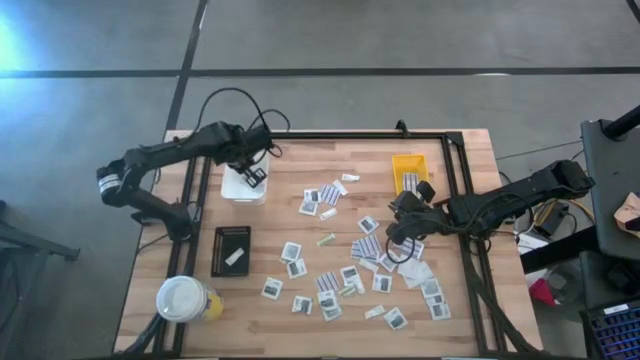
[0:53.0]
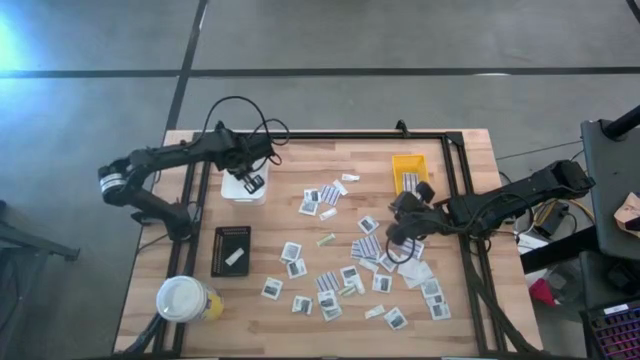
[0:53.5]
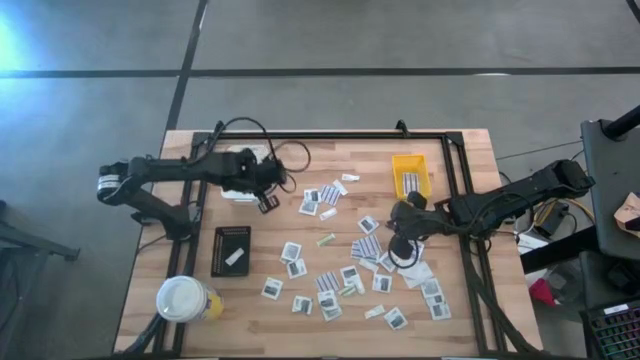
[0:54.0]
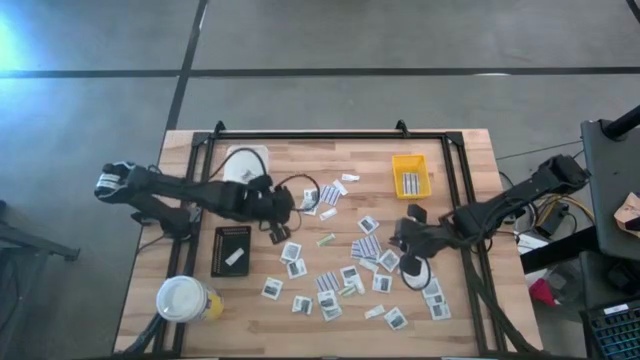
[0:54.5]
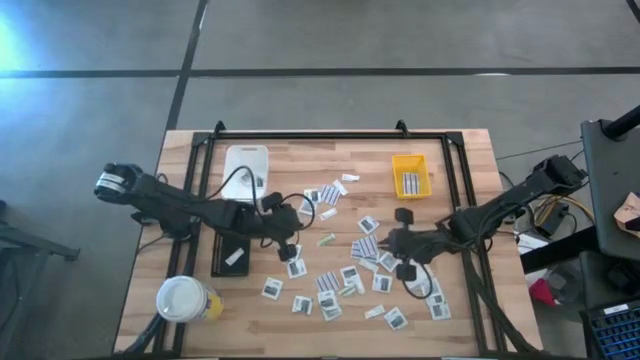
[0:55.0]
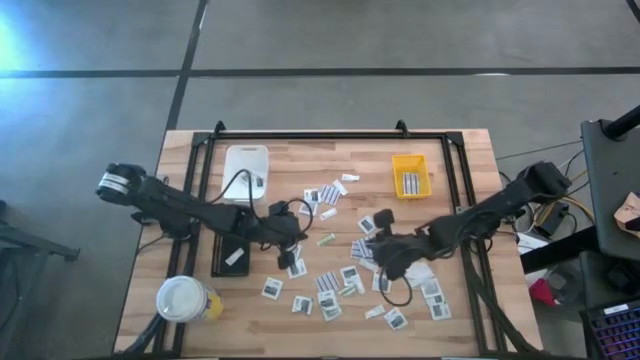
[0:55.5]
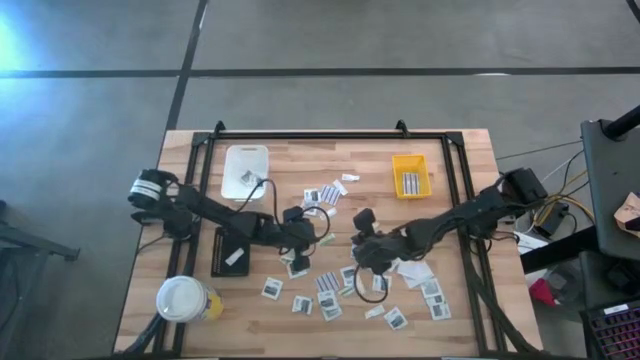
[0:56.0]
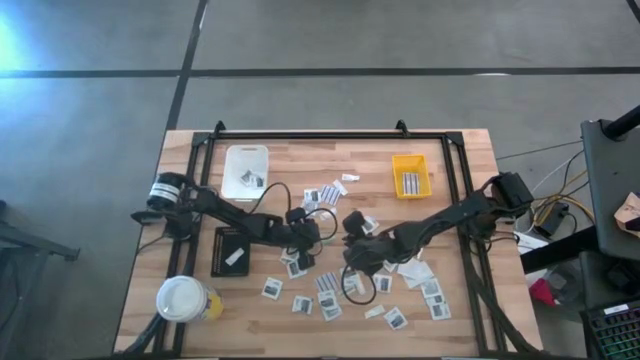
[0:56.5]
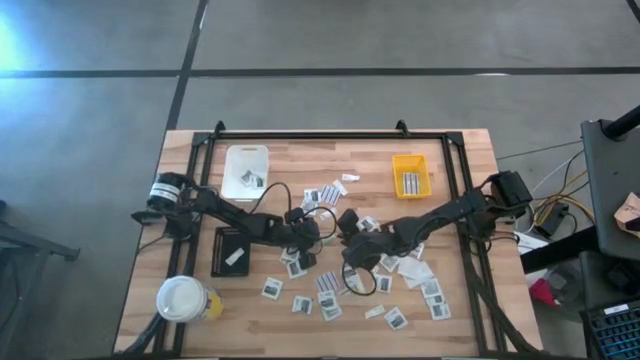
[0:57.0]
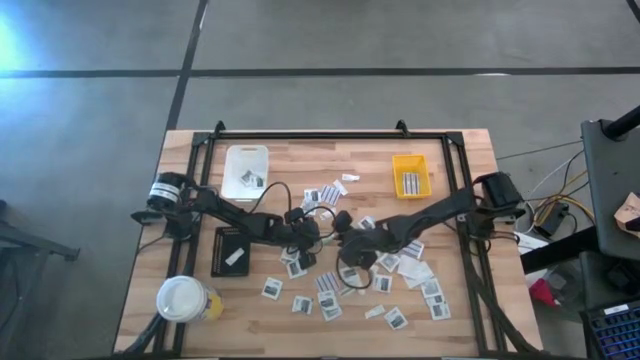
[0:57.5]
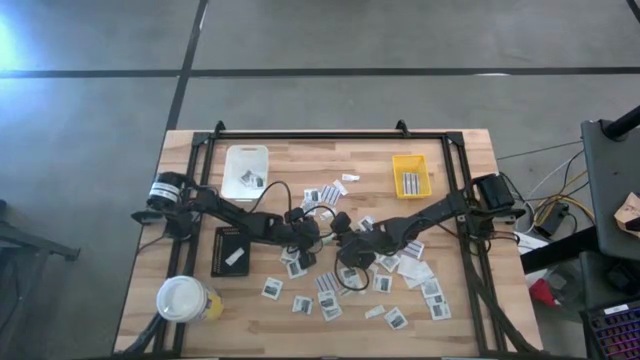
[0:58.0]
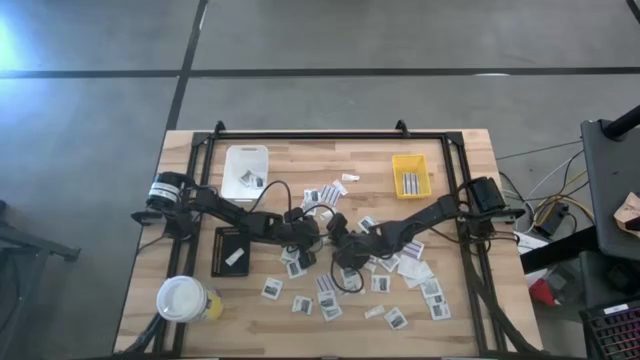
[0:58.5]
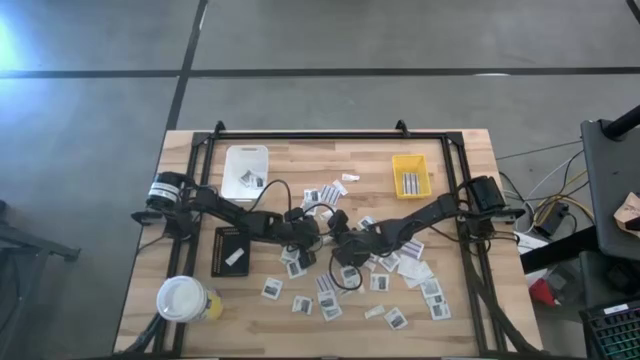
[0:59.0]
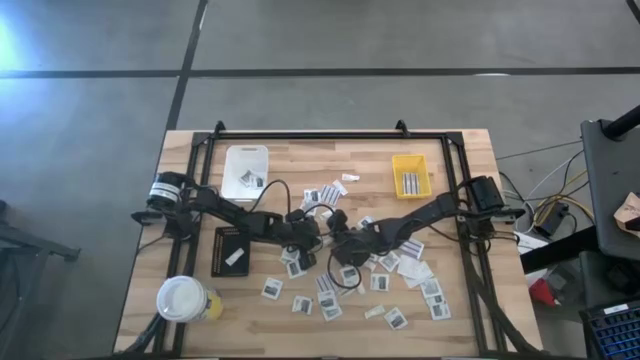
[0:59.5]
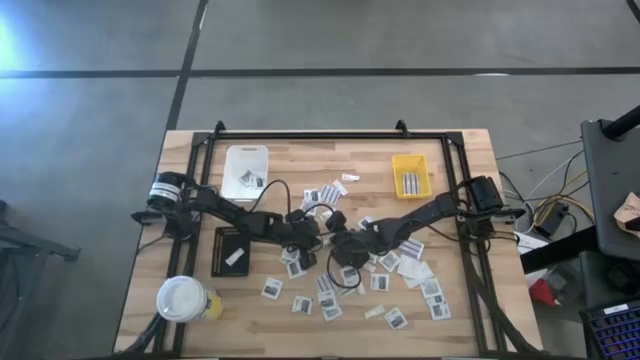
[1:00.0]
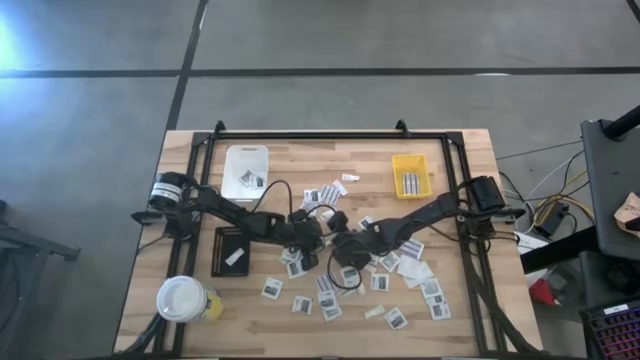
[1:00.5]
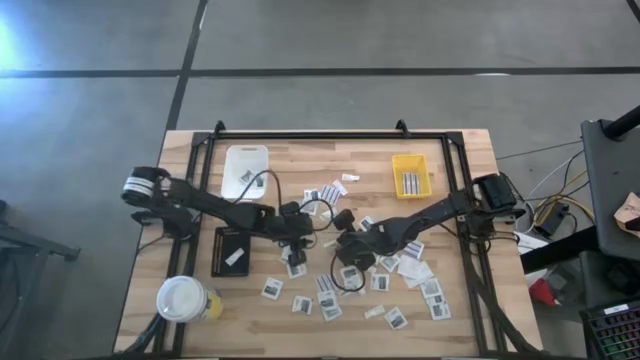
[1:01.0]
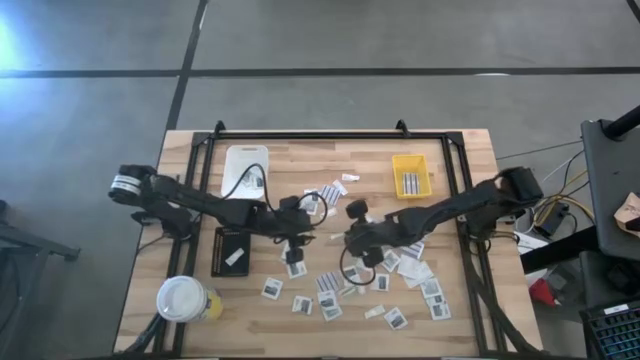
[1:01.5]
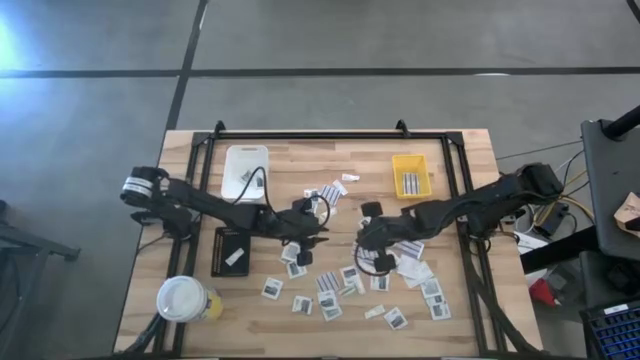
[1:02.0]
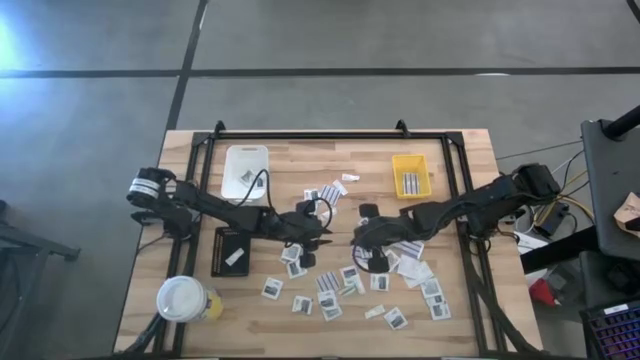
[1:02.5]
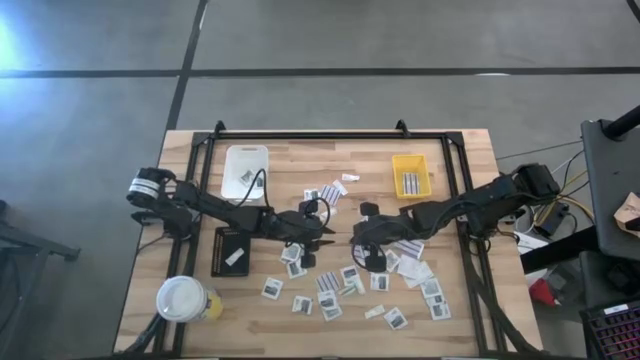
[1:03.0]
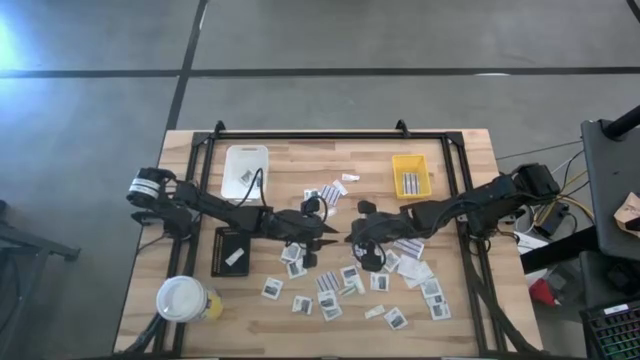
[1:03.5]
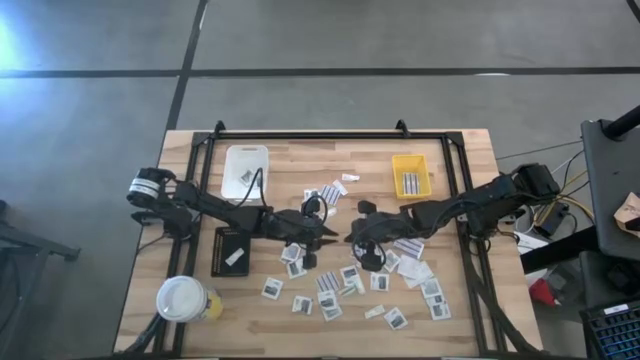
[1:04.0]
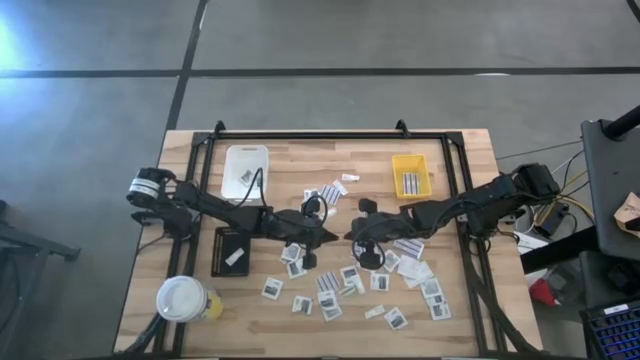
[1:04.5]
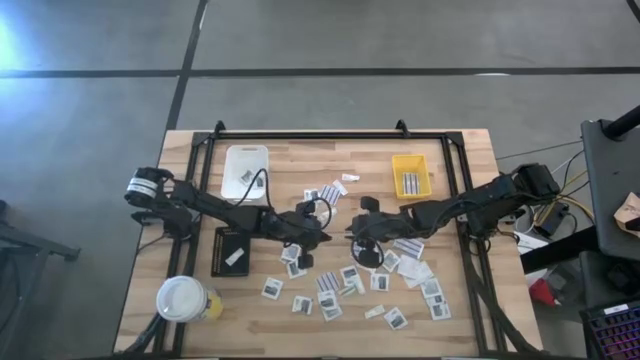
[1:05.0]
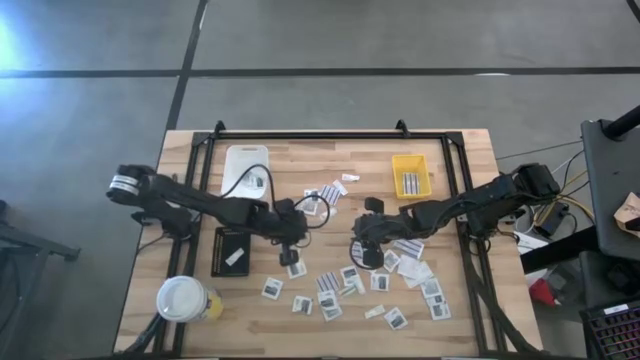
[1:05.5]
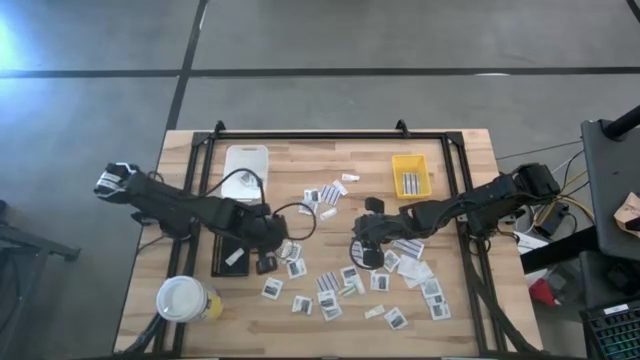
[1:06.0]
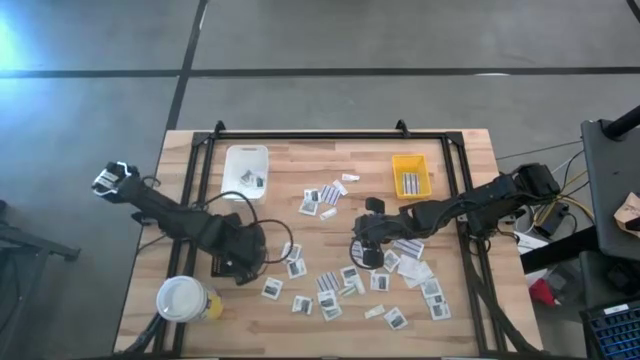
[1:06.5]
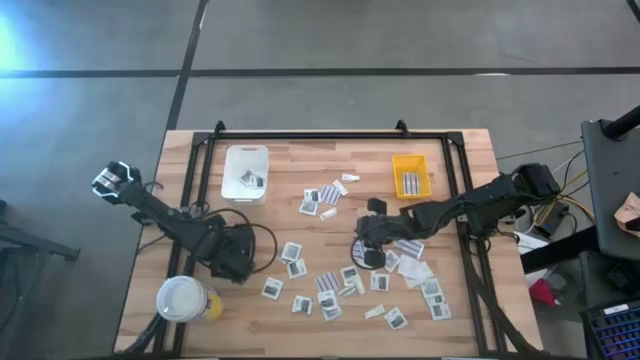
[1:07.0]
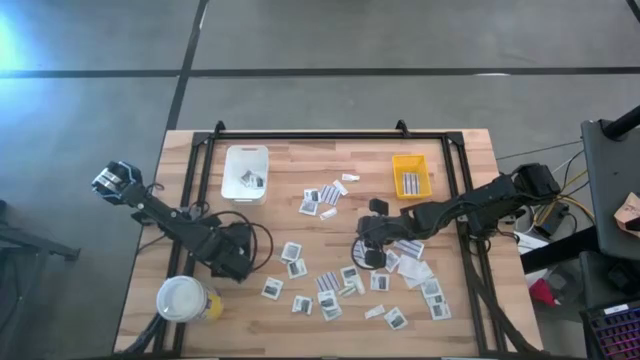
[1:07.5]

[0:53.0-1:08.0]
Task: Pick & Place First Aid Supplies
Put the green bandage pack into the black bin

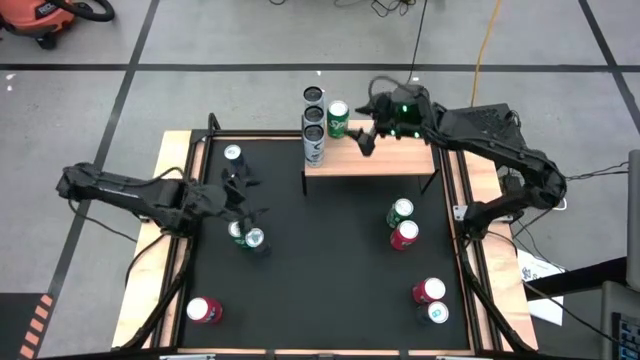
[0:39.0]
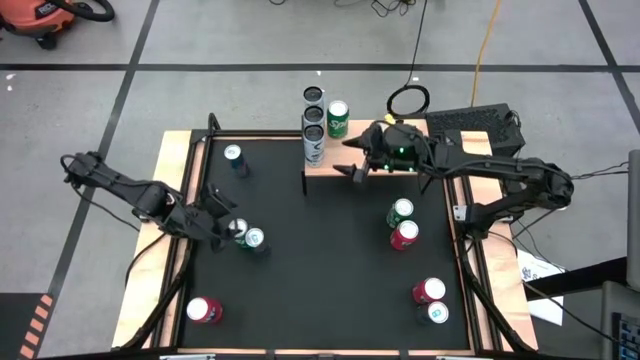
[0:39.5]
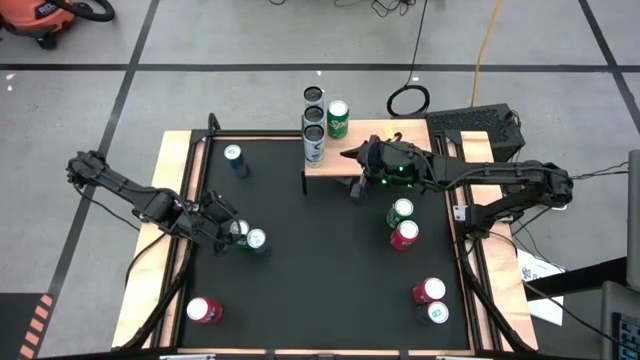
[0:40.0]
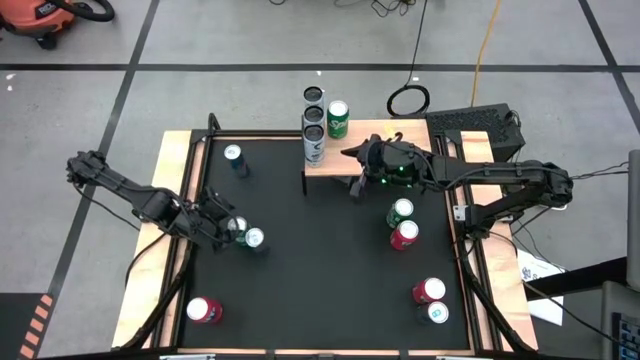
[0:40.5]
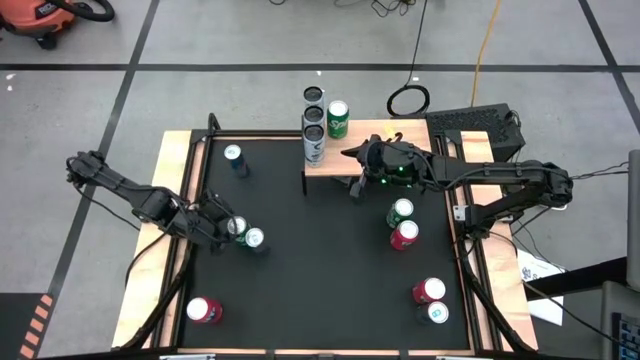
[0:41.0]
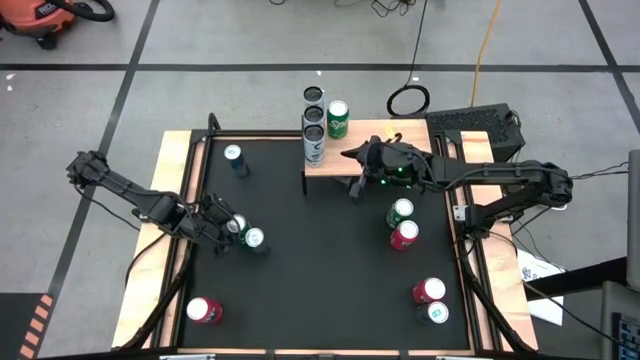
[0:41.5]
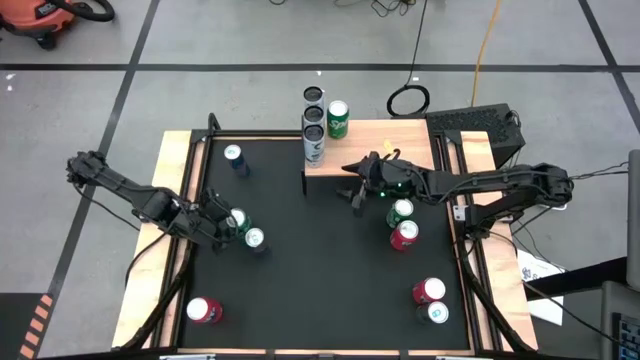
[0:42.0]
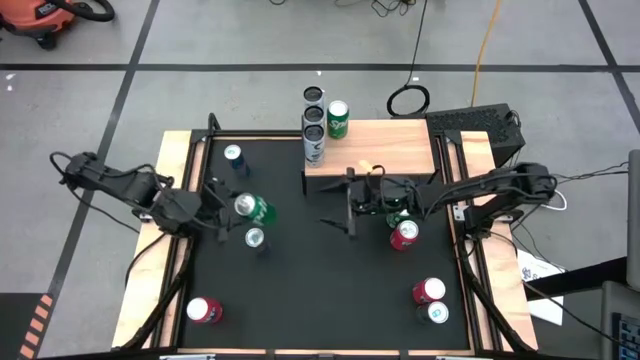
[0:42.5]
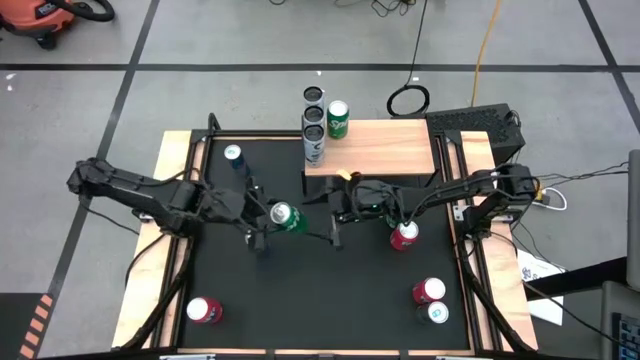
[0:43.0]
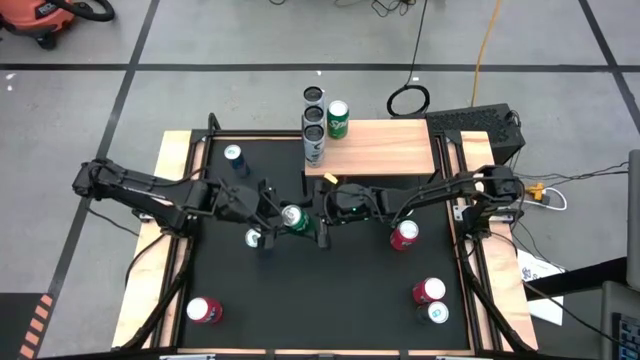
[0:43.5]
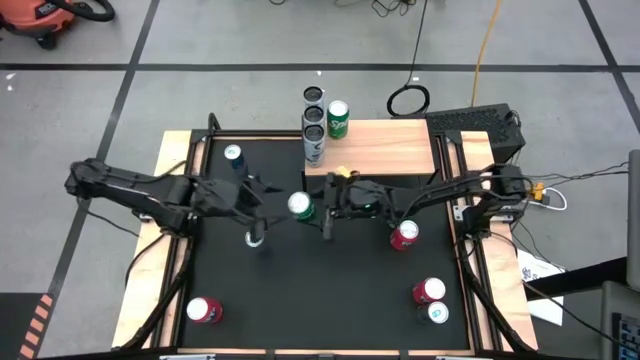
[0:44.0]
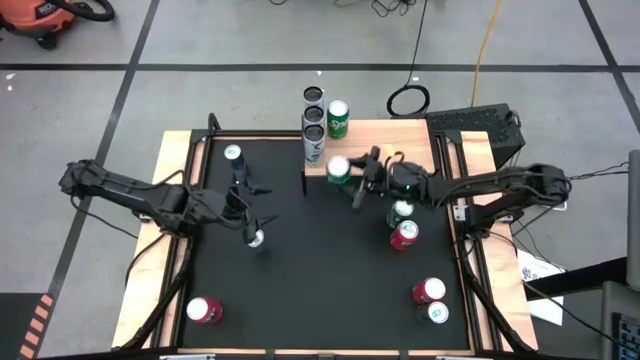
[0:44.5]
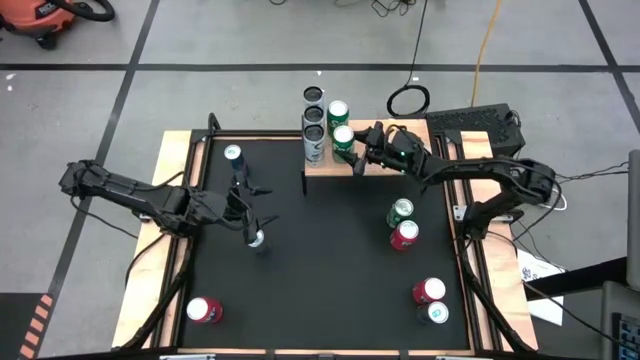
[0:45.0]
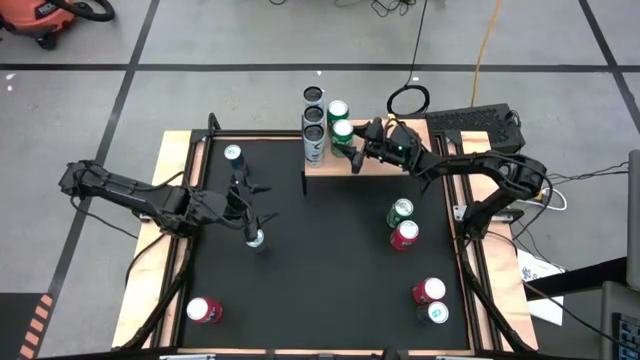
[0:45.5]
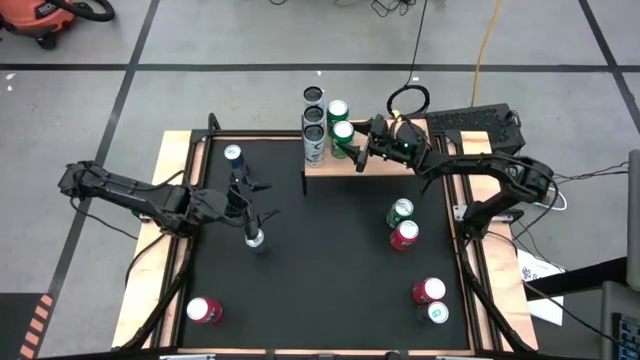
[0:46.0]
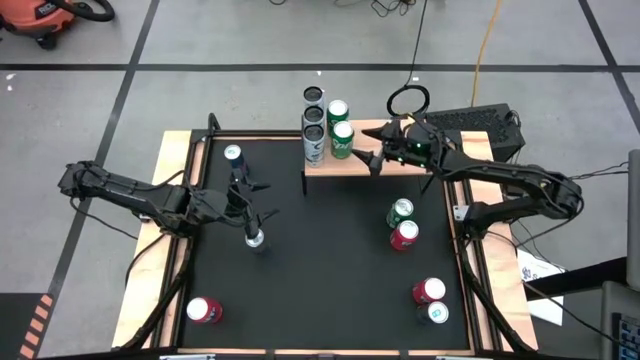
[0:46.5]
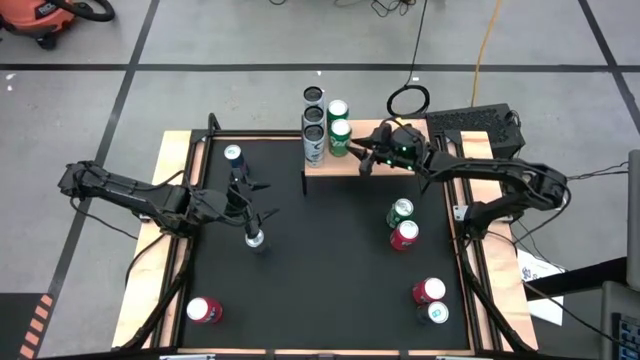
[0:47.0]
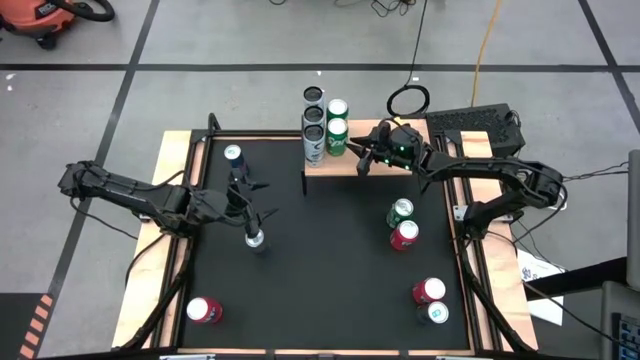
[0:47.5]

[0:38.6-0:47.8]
Task: Place canned beverage on shelf
Put the left green soda can on the shelf aligned with the other green soda can
